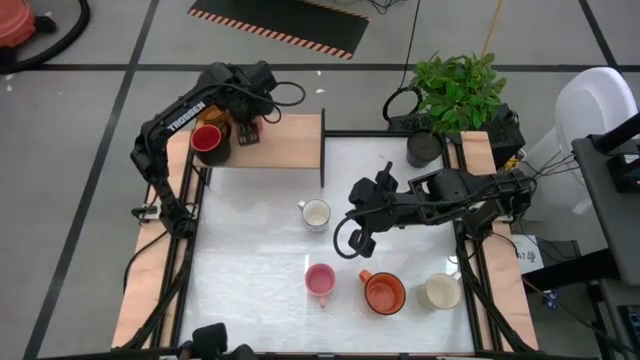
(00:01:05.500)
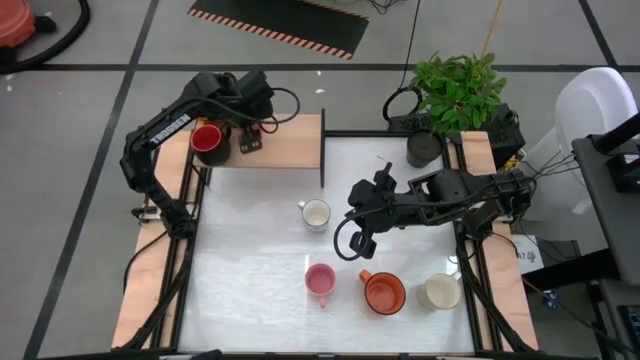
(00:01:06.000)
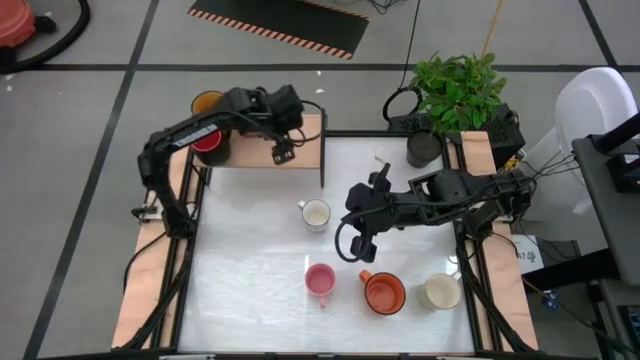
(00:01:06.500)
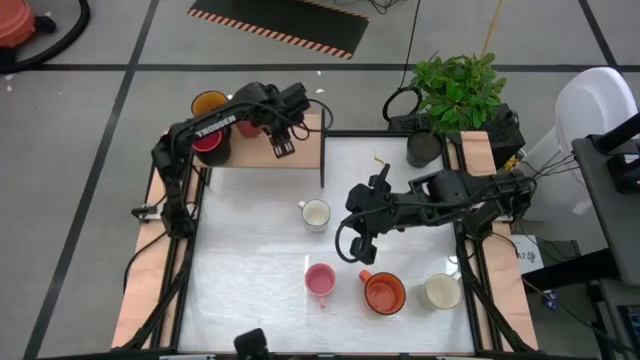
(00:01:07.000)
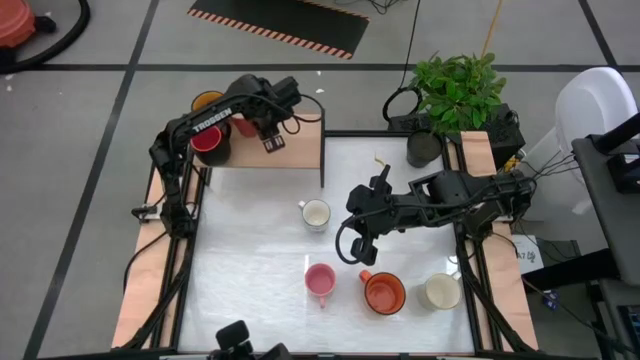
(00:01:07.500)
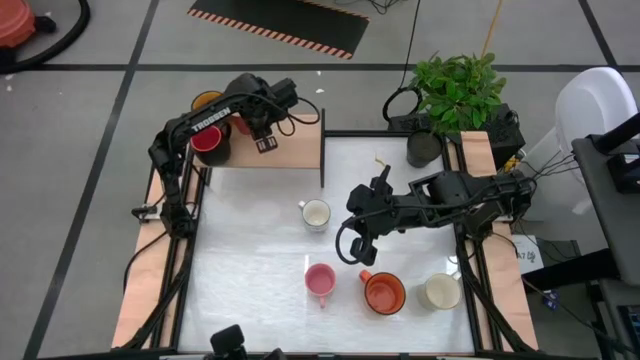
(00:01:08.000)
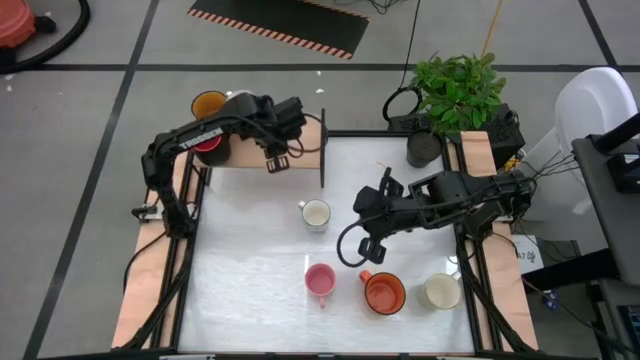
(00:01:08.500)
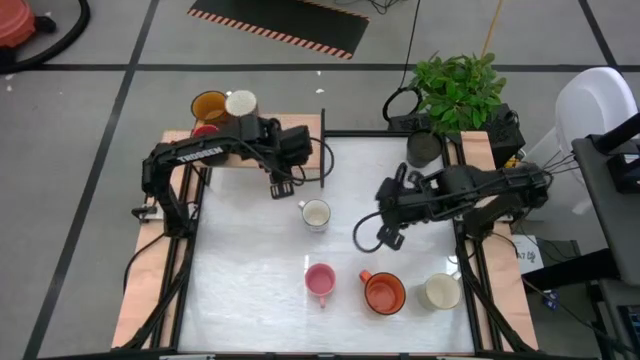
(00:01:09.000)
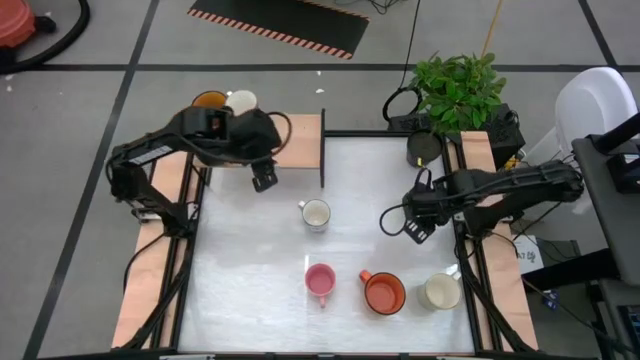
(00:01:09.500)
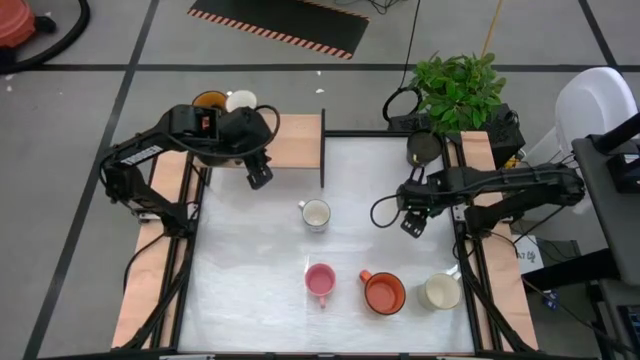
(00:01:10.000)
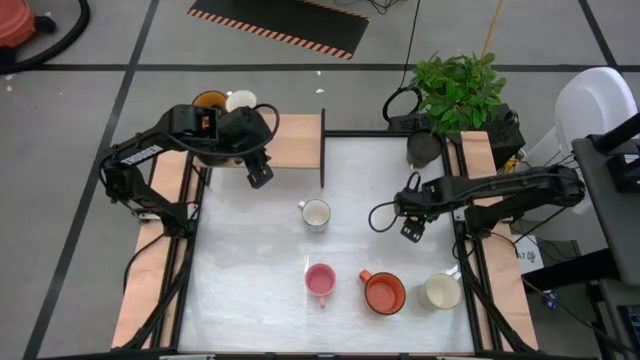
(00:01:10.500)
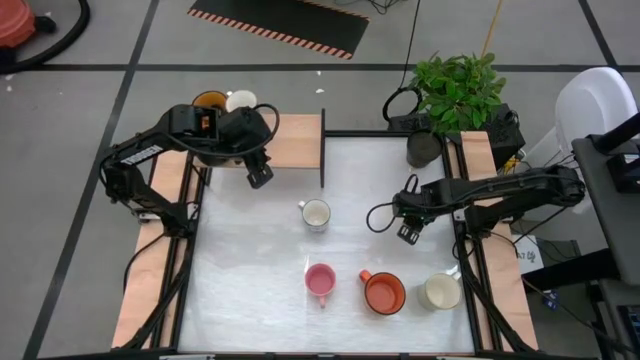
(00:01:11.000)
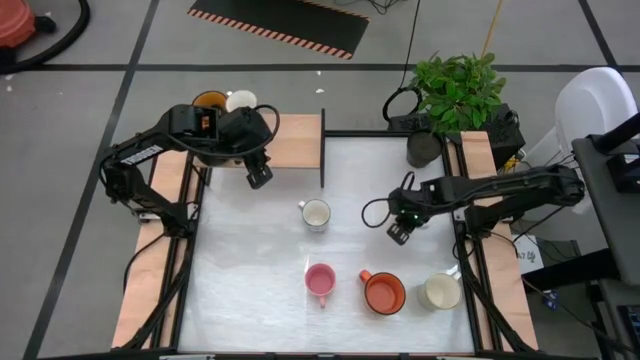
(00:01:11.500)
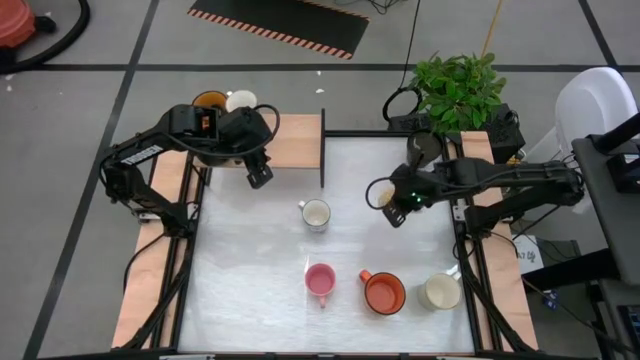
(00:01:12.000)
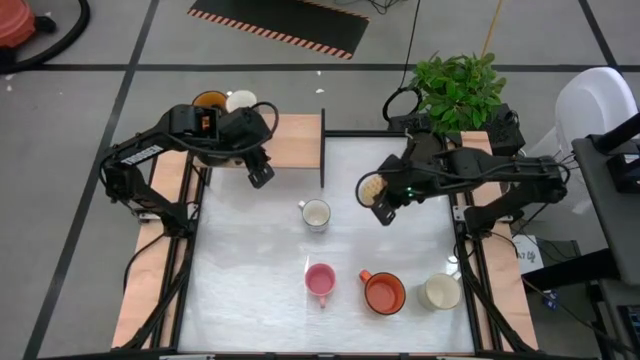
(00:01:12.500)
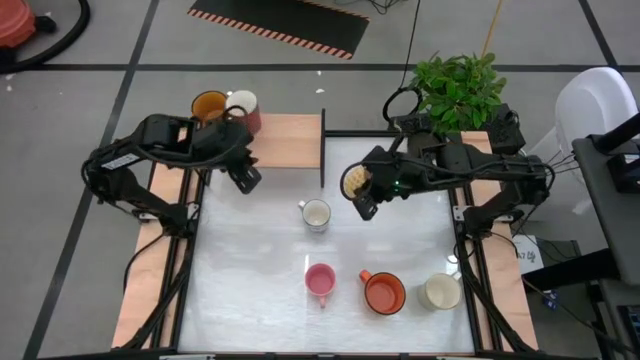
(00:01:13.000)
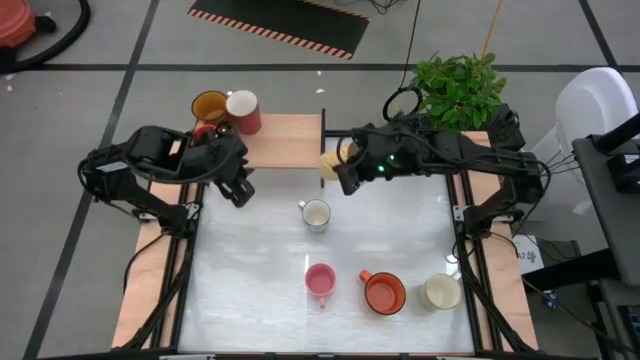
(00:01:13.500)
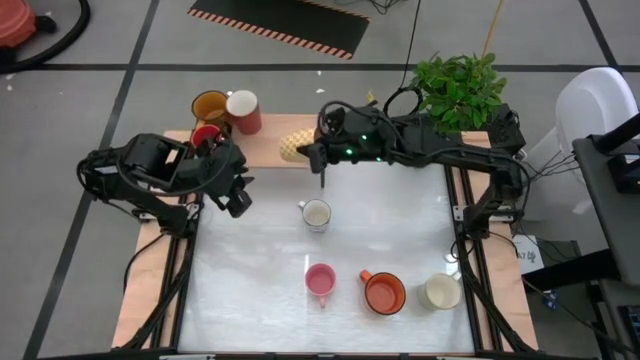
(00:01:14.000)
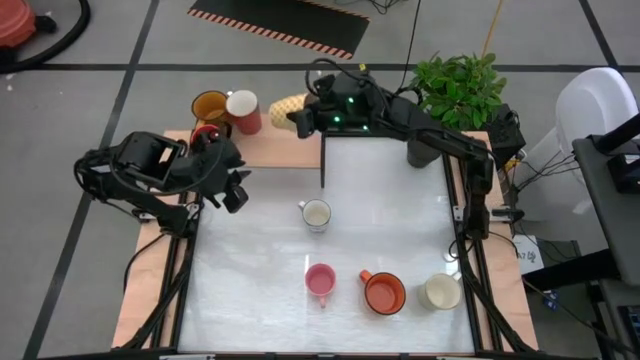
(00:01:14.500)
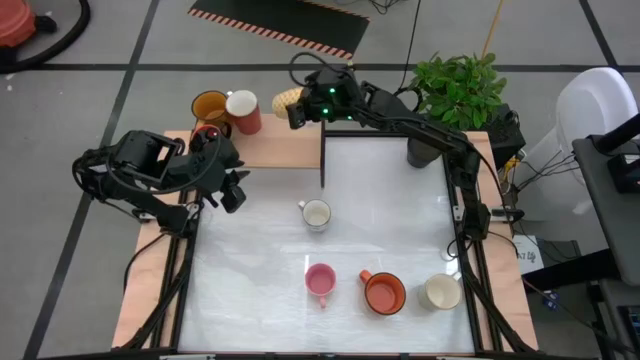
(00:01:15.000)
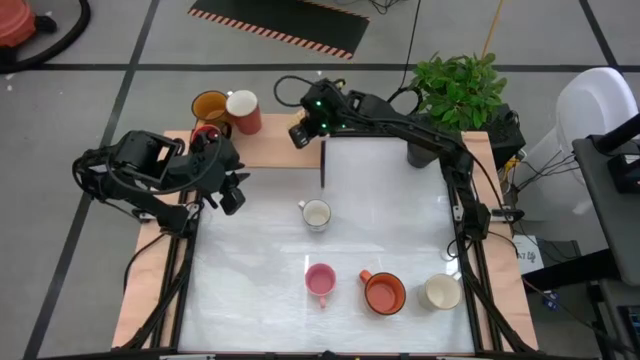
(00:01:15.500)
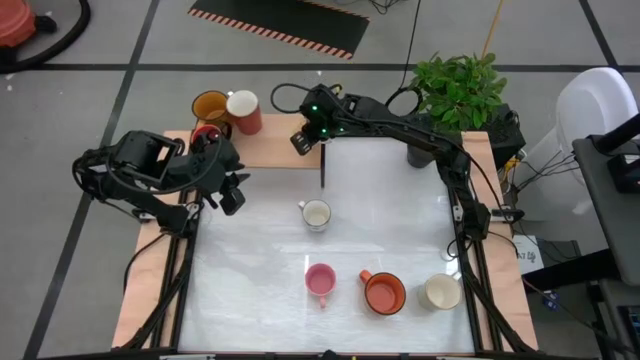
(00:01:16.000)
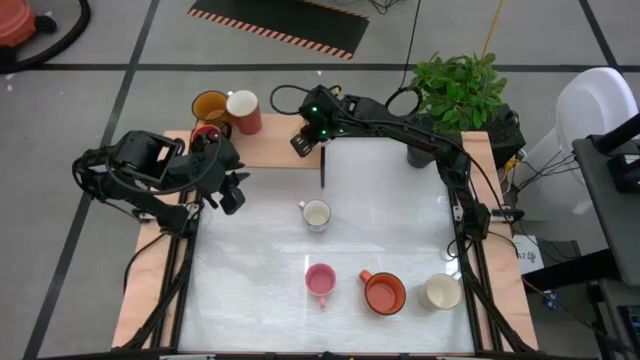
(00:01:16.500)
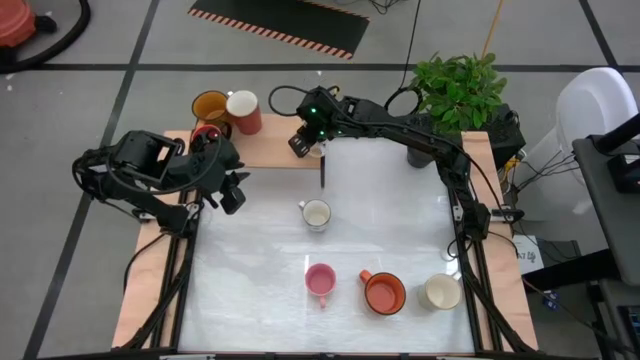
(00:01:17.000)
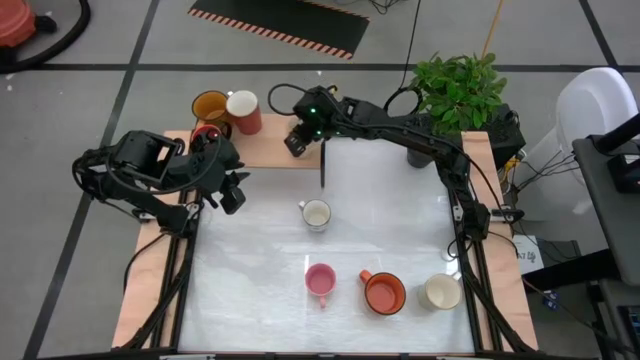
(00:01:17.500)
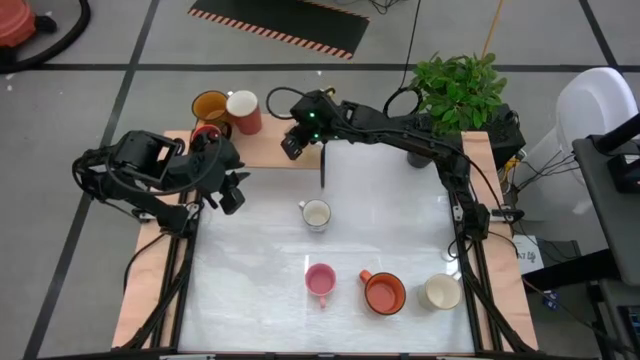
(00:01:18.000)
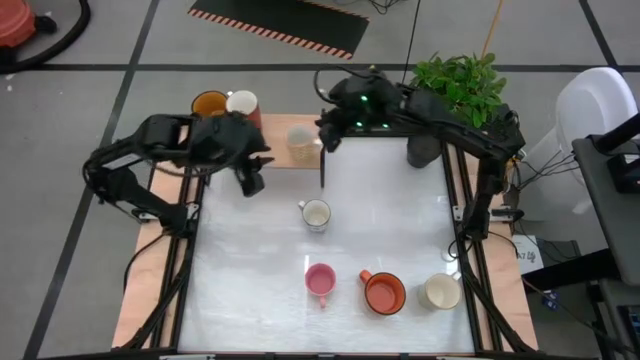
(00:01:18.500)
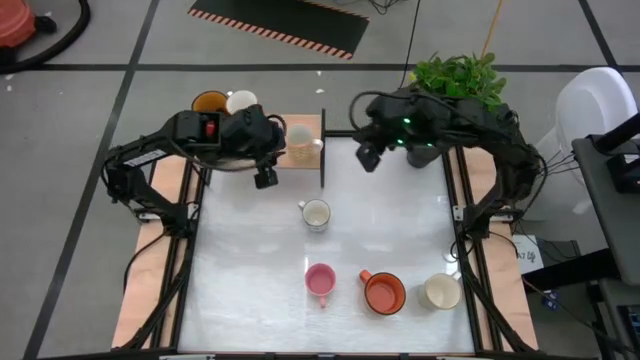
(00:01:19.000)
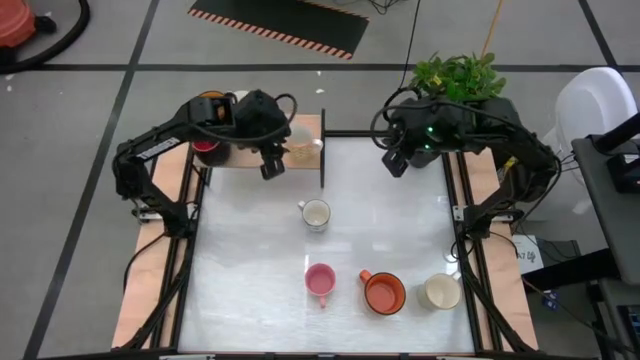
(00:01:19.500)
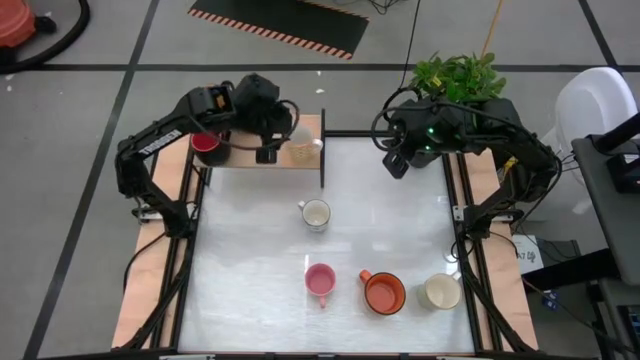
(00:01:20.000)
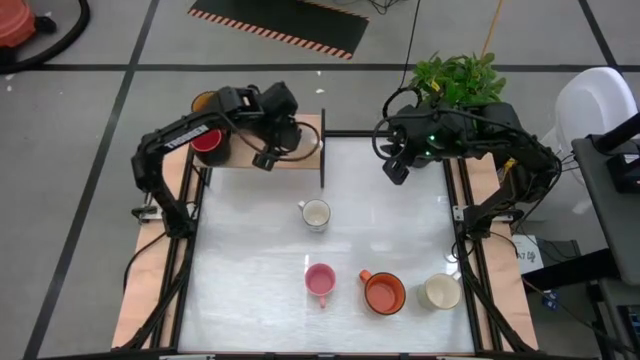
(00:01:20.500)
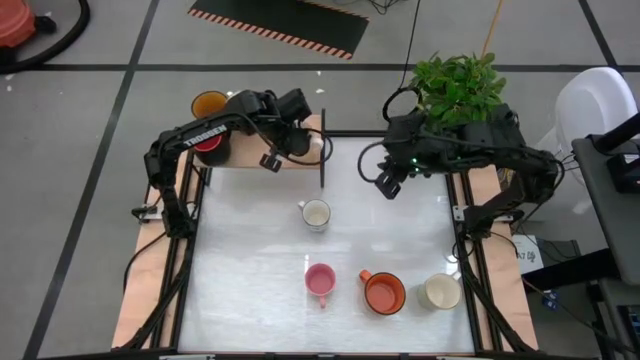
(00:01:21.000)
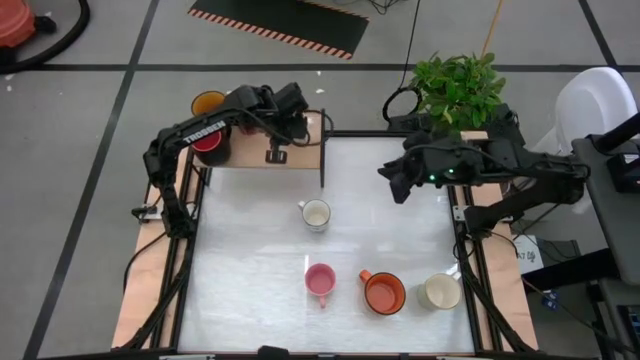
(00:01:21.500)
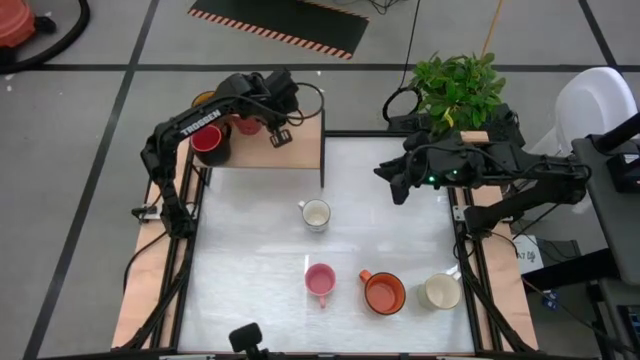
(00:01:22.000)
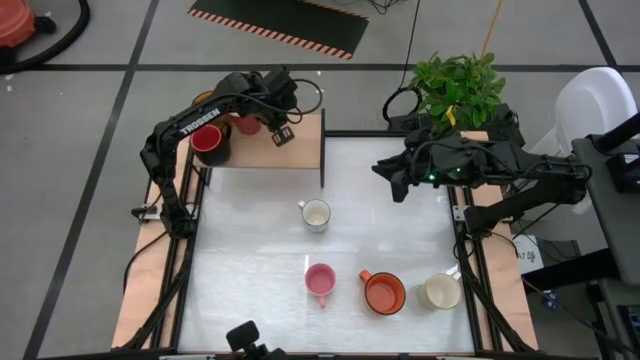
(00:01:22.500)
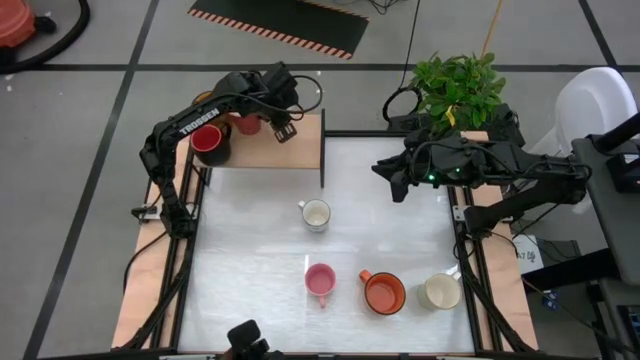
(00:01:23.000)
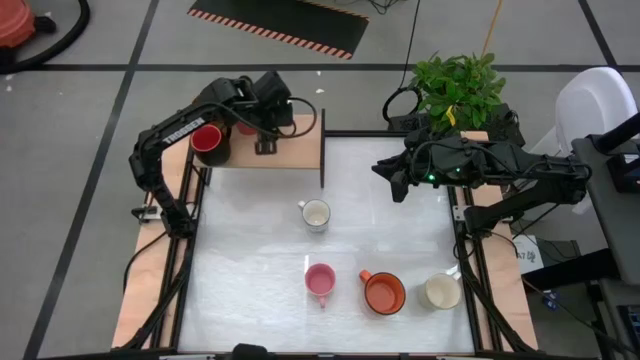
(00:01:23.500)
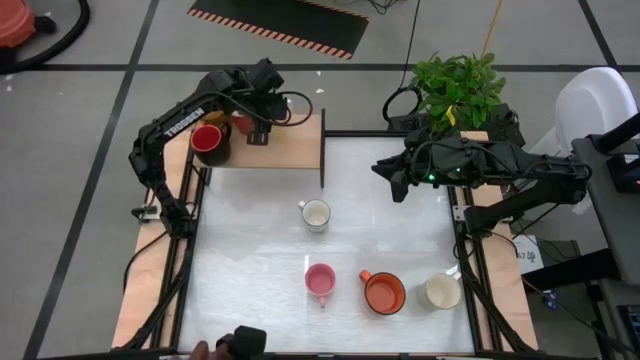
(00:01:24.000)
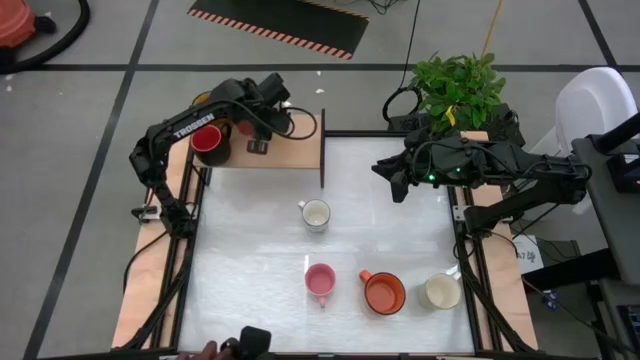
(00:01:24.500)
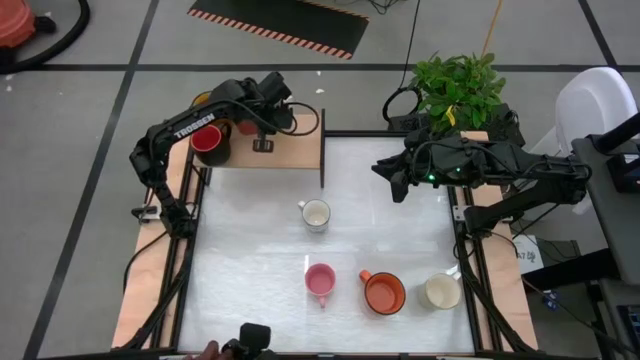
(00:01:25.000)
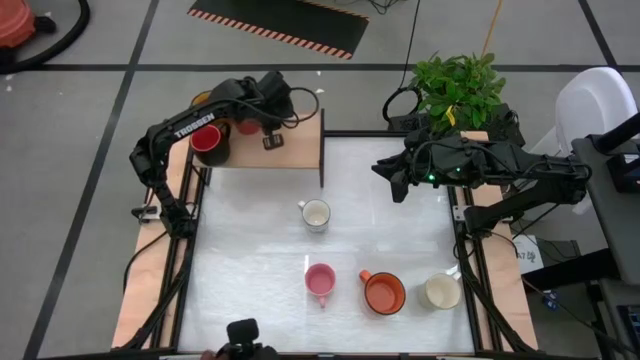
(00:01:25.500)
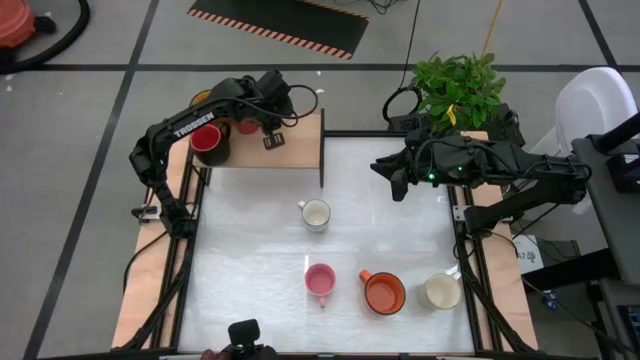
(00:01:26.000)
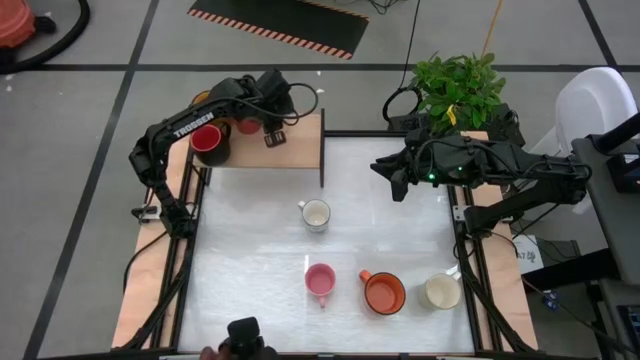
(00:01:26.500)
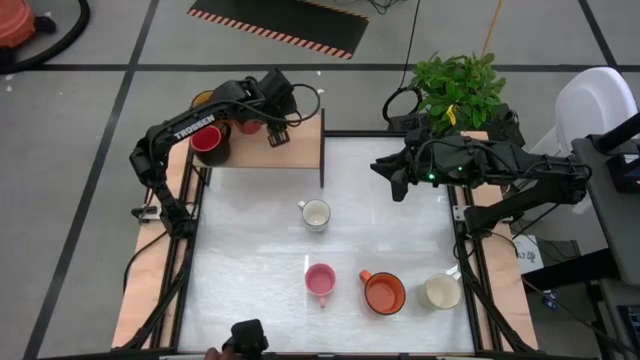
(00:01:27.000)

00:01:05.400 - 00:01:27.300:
Task: Place coffee mugs
Put the yellow patterned mug on the shelf
